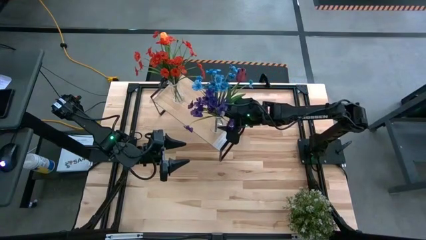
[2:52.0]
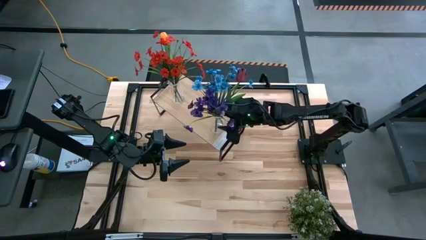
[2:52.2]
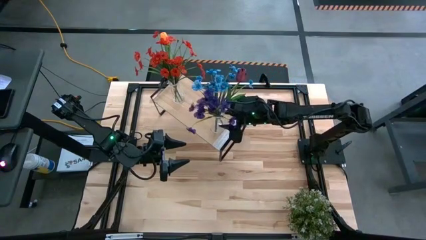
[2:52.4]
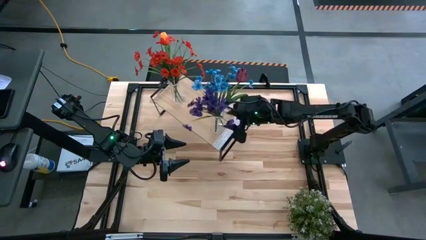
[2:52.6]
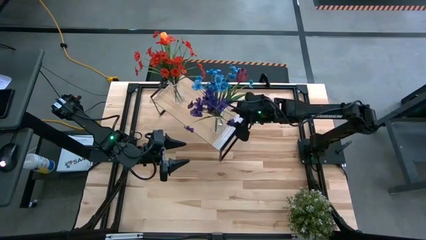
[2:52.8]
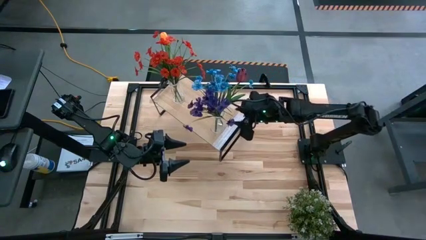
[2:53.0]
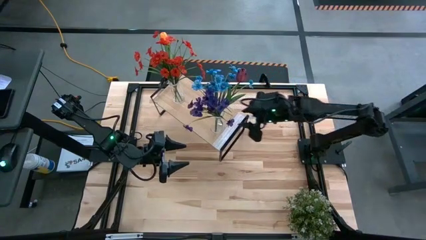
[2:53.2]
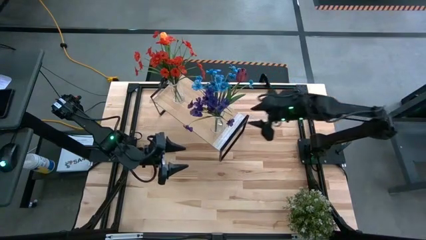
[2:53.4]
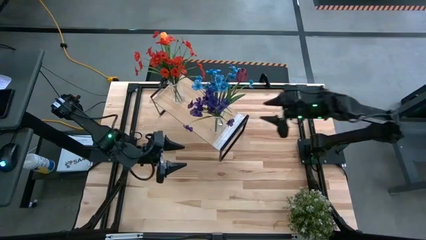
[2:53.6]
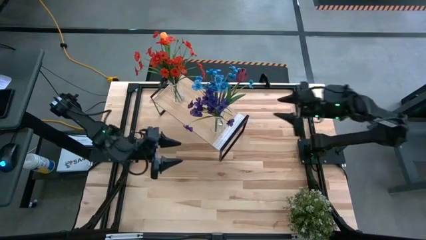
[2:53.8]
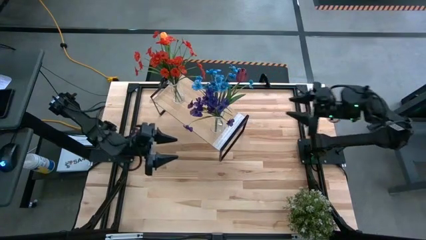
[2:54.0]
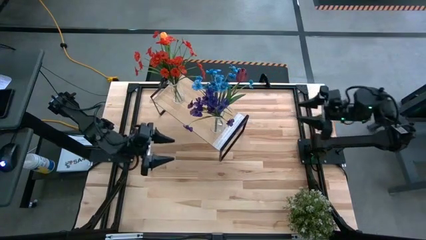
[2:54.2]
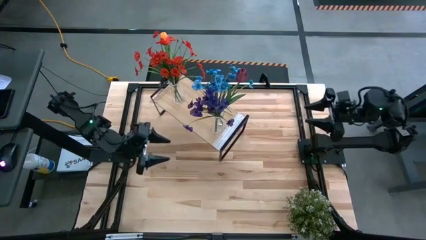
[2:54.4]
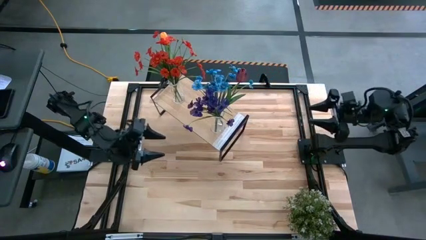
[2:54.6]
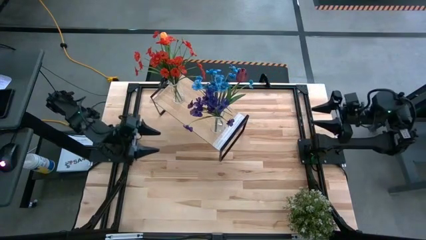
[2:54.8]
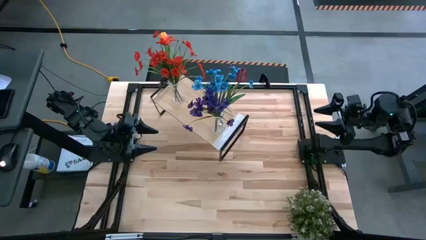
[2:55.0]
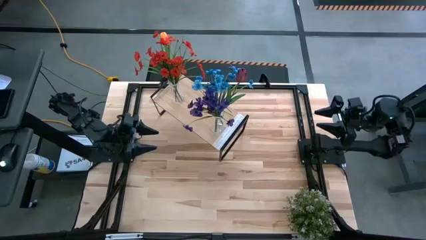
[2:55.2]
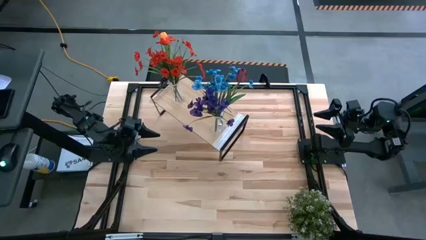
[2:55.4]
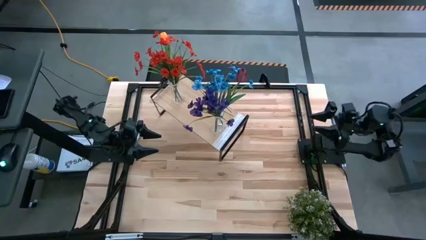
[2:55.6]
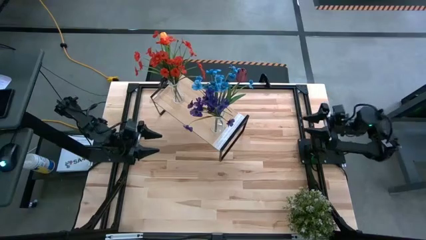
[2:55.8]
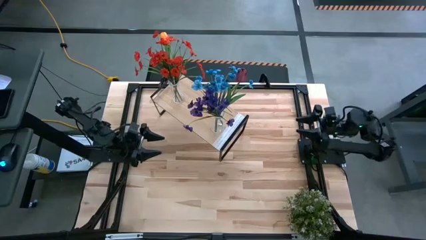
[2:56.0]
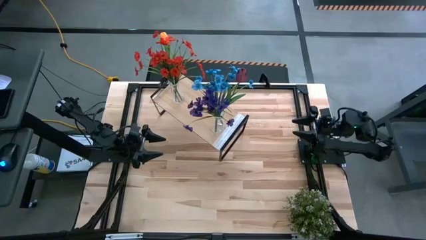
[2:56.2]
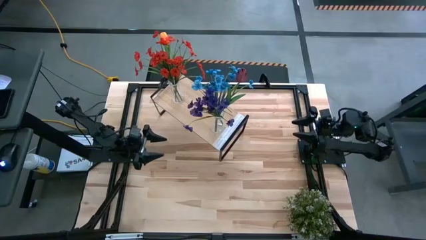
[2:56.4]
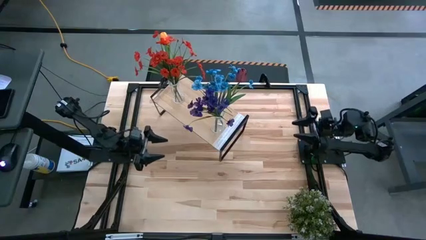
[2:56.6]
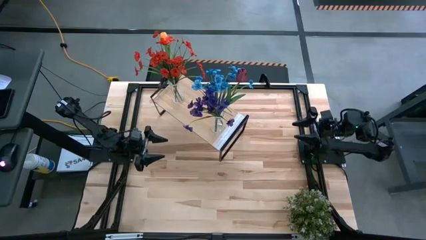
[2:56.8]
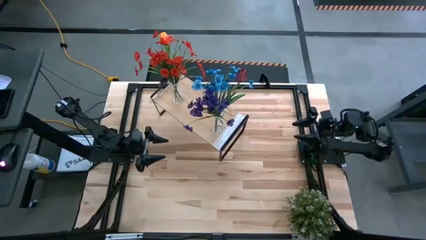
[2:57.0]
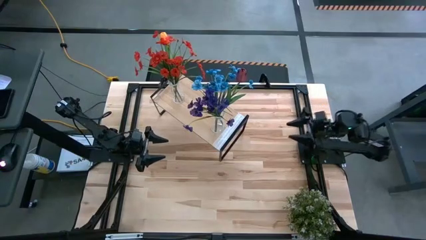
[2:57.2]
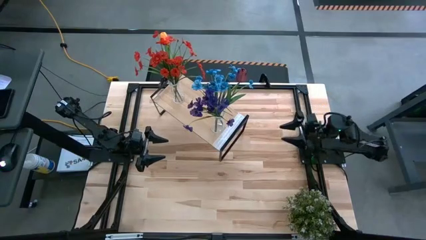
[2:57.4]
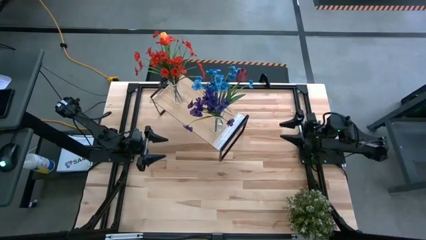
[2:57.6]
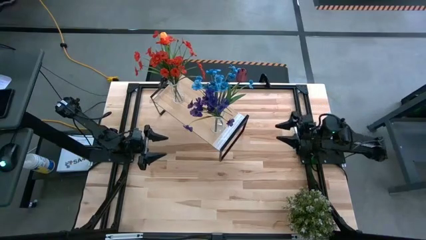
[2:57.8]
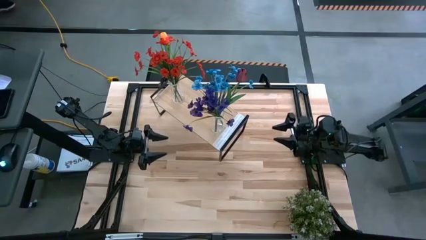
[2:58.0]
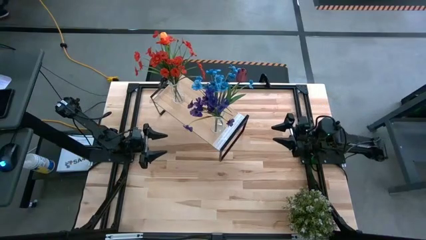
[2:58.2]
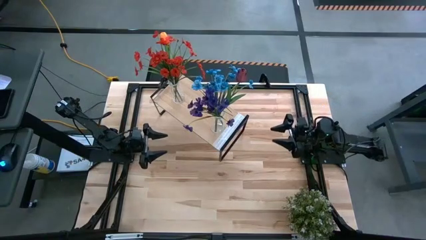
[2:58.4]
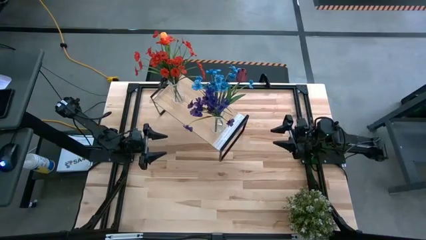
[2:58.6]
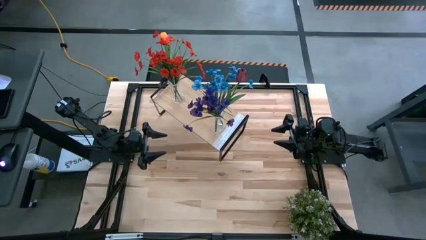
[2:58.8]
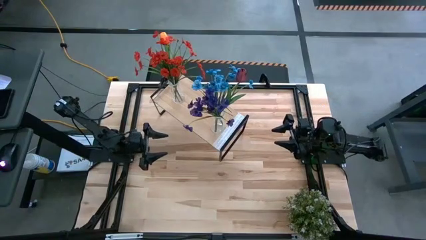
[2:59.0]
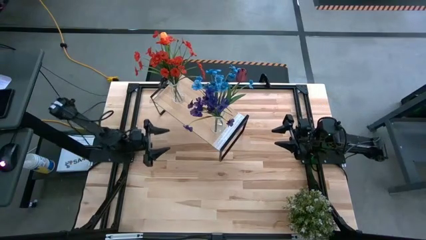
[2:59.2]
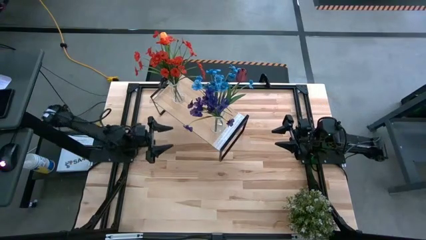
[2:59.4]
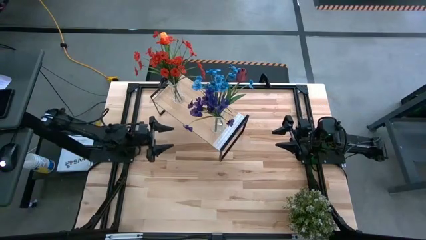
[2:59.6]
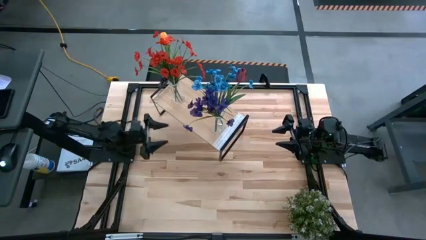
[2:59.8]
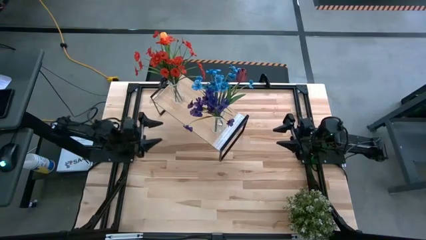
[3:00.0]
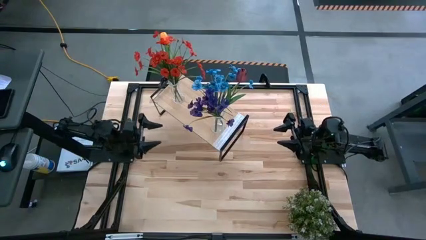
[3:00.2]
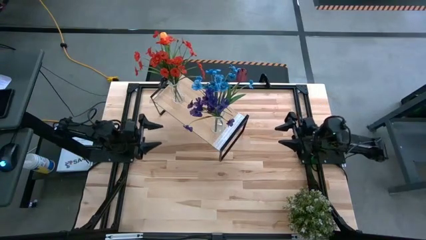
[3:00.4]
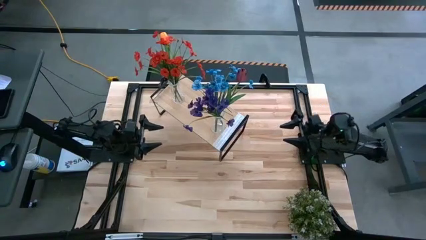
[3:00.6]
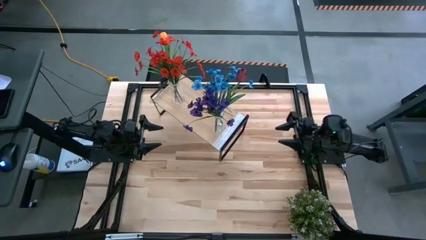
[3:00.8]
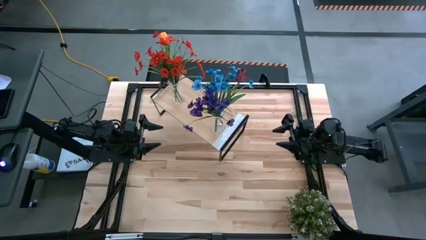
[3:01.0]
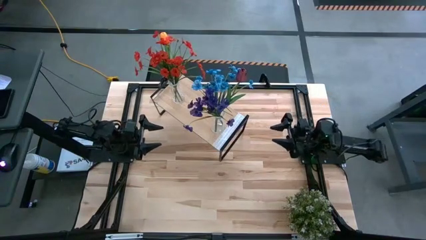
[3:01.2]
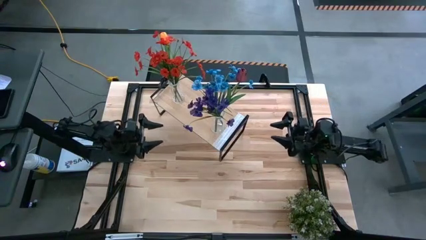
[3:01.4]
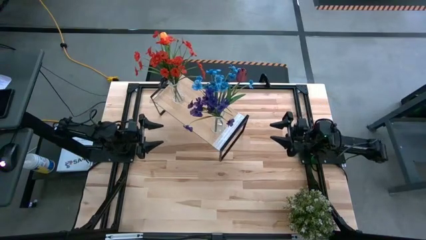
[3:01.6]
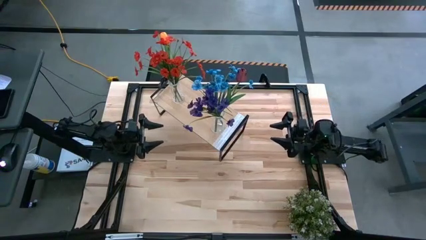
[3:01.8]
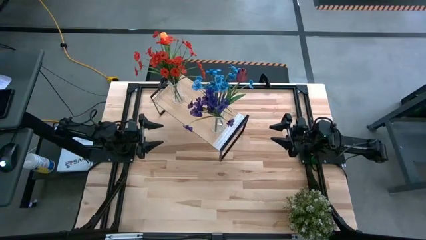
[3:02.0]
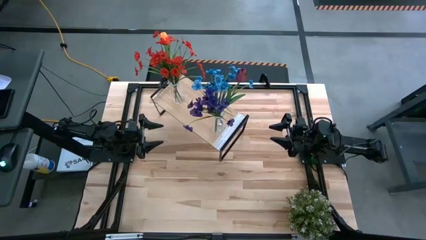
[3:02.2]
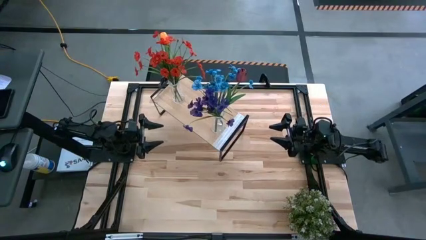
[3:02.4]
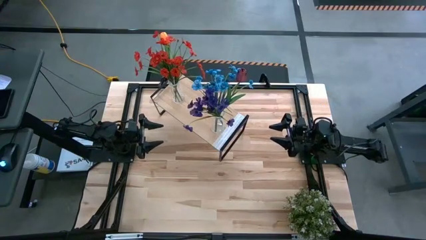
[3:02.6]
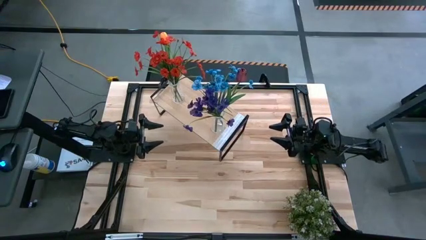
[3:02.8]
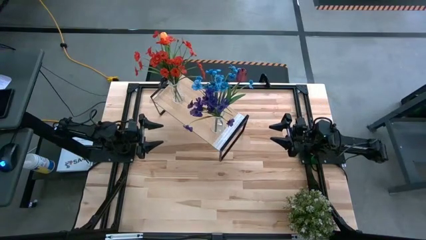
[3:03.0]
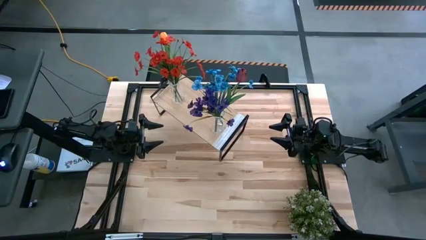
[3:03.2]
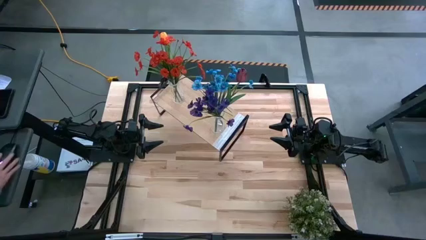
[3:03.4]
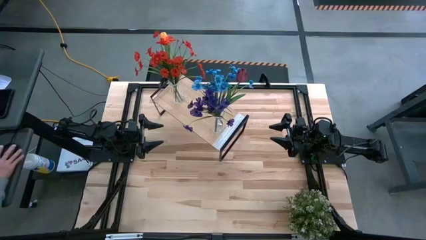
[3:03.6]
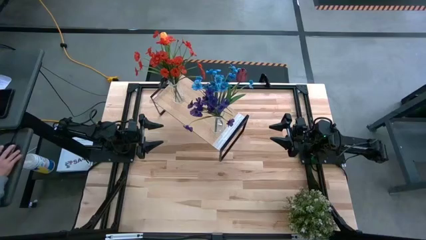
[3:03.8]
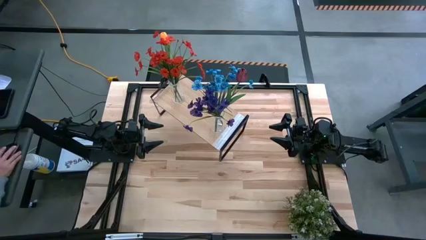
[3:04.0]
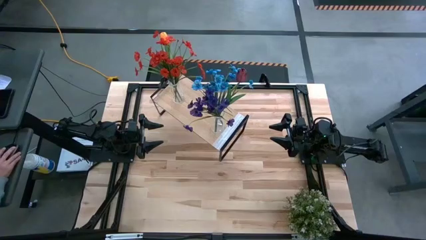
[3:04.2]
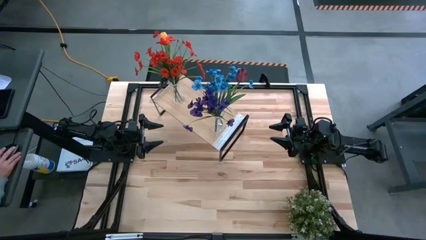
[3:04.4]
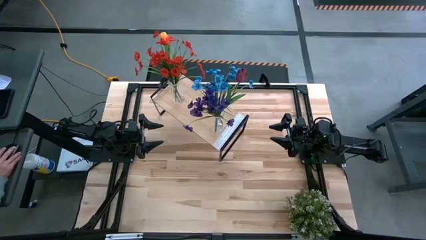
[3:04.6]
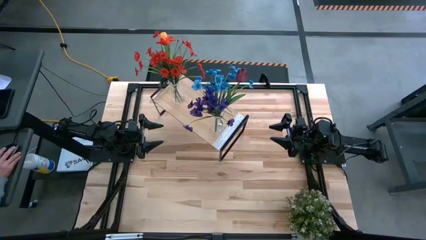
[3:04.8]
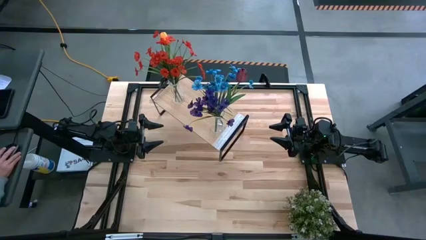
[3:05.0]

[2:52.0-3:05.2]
Task: Pick and place flowers into a vace then onto a shelf
Return to Home Position

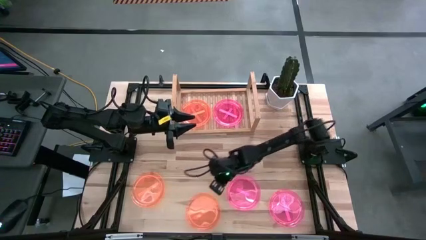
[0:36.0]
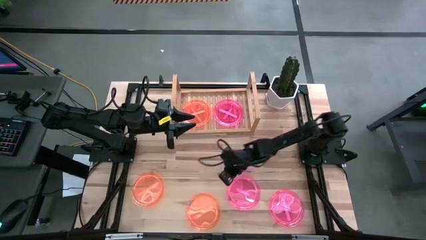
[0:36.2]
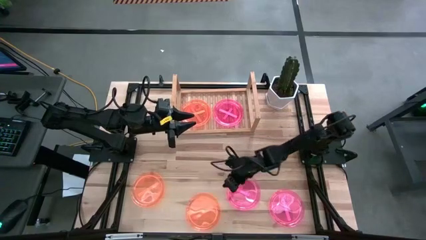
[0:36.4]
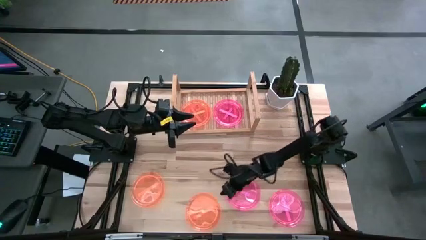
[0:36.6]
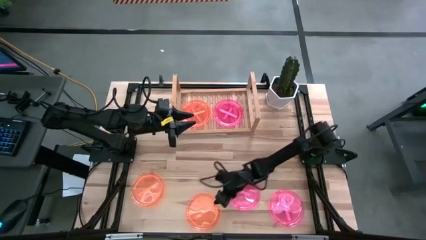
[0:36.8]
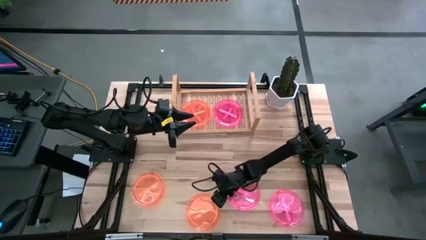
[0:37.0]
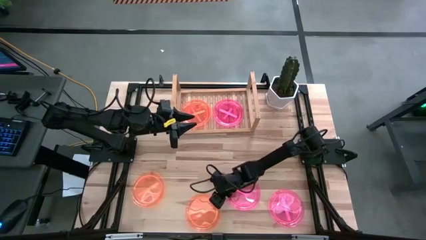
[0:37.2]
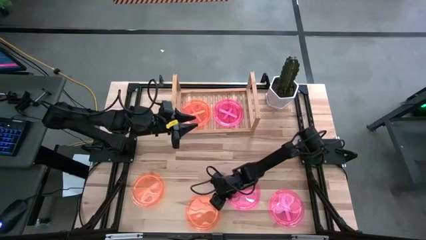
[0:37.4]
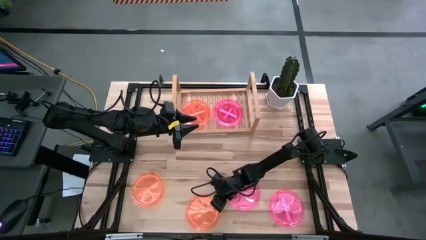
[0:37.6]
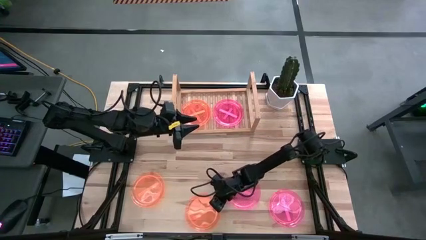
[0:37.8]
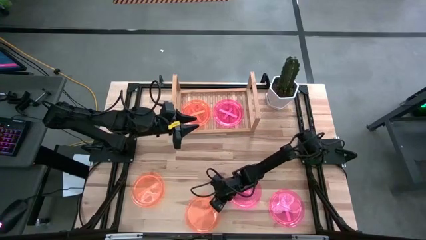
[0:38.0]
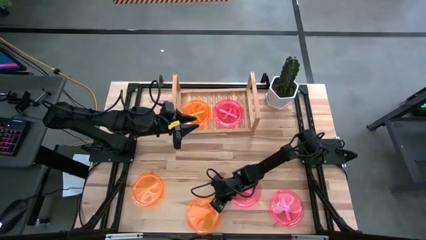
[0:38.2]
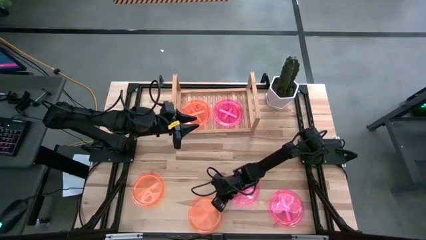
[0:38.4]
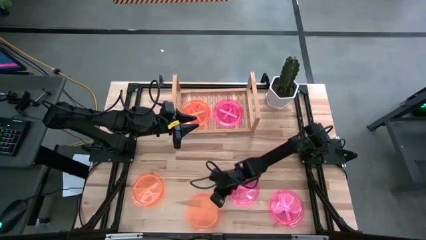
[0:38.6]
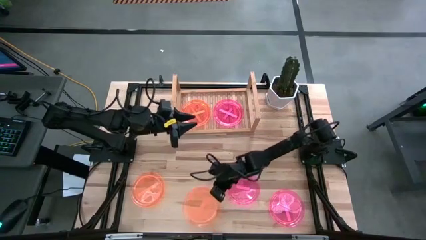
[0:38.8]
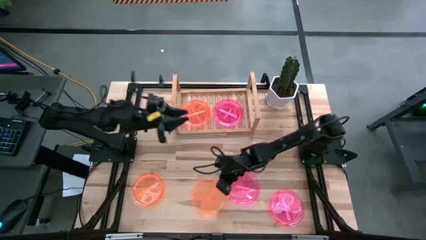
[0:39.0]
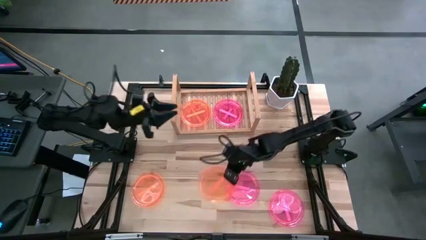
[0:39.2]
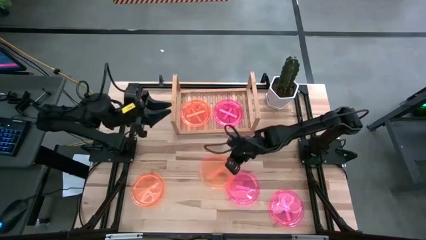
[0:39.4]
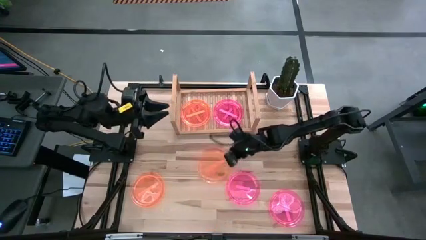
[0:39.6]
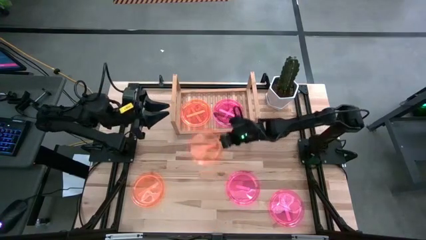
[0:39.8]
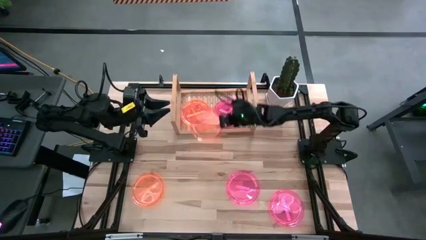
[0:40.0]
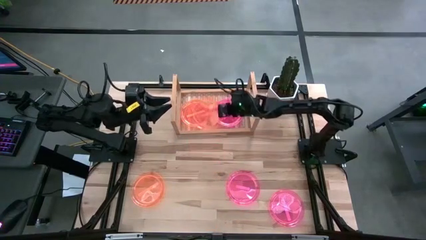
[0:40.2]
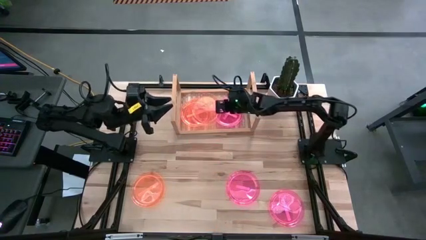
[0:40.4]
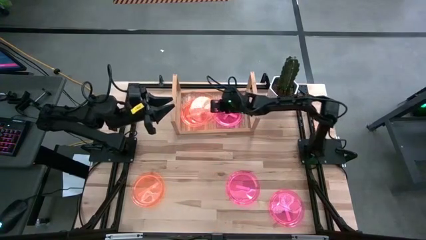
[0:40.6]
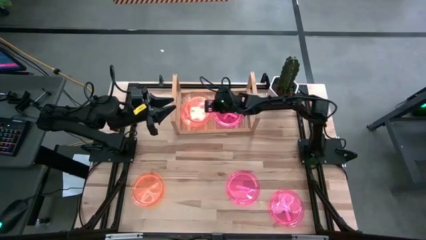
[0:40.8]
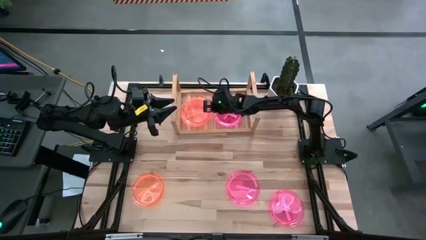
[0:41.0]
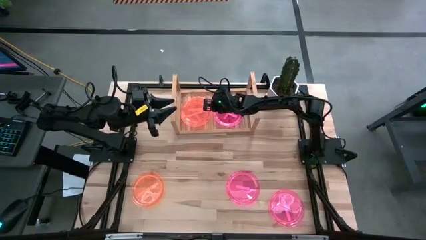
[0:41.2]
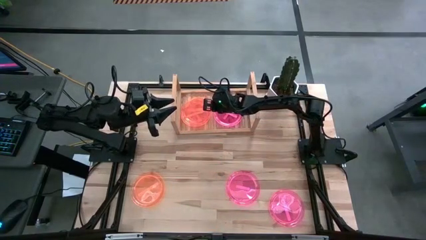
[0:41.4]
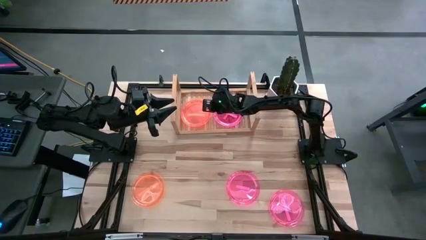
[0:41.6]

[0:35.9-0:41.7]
Task: Place and stack plates onto a shelf
Stack the right orange plate on top of the orange plate
